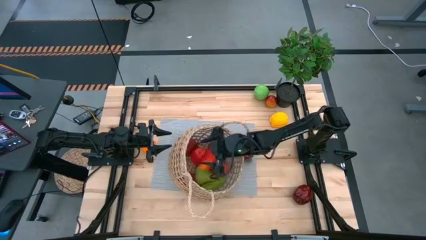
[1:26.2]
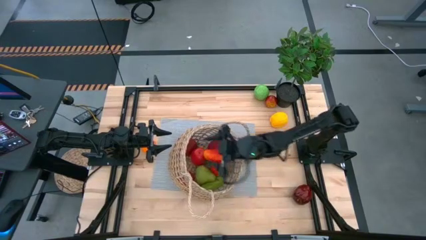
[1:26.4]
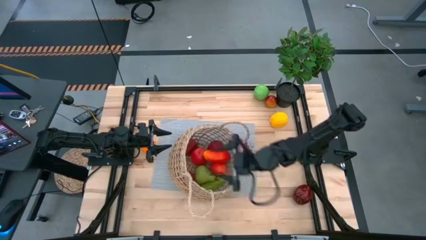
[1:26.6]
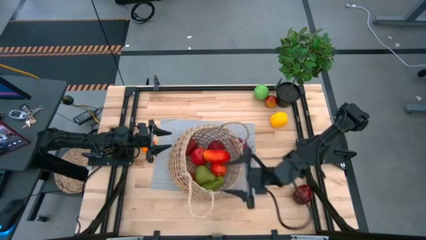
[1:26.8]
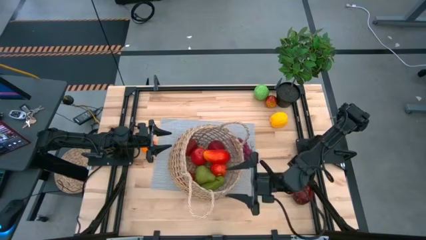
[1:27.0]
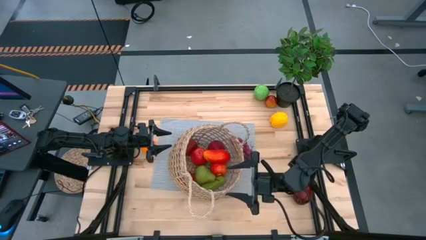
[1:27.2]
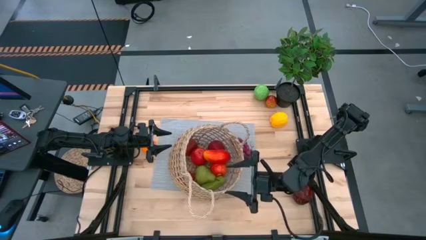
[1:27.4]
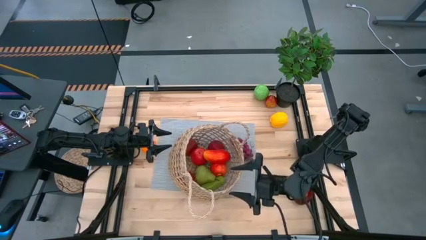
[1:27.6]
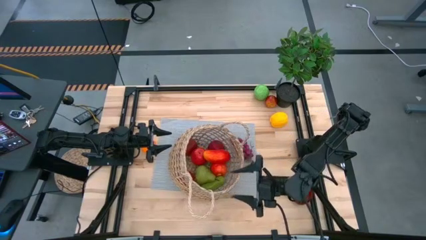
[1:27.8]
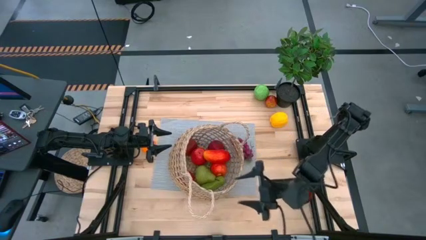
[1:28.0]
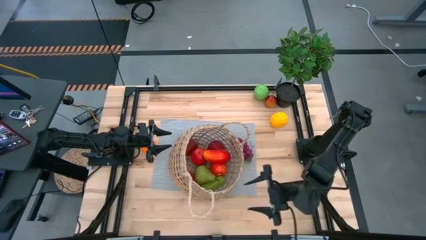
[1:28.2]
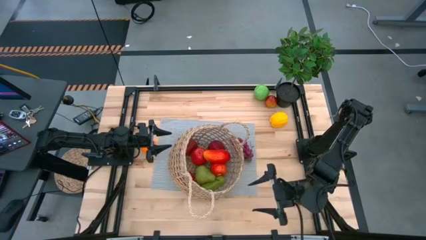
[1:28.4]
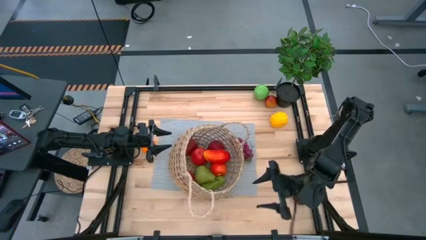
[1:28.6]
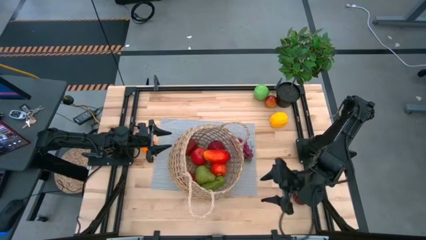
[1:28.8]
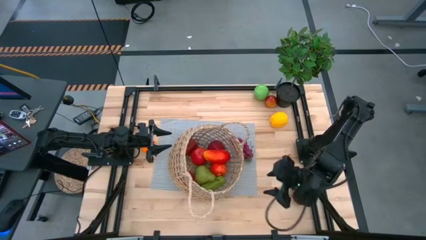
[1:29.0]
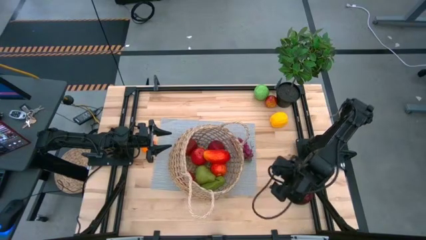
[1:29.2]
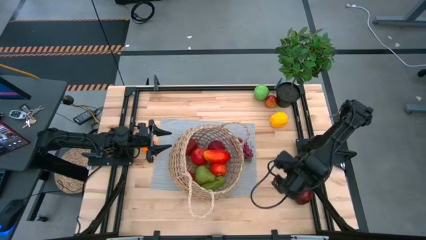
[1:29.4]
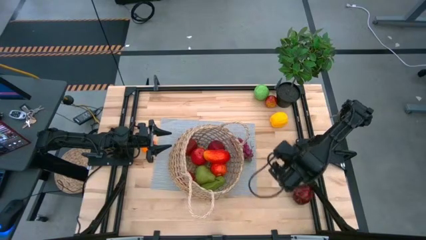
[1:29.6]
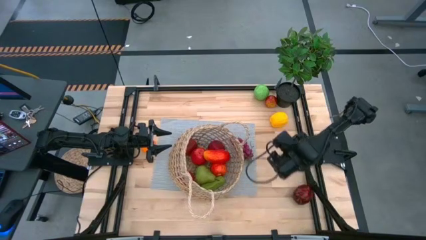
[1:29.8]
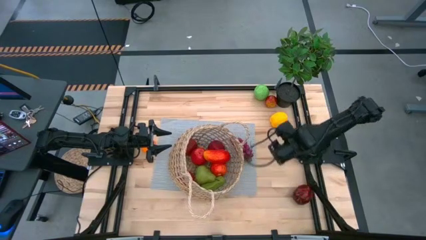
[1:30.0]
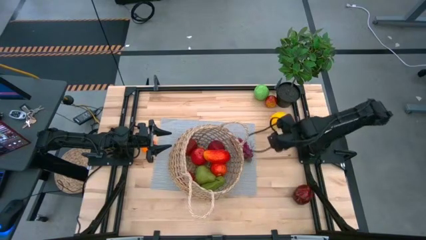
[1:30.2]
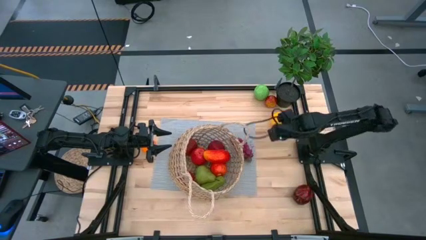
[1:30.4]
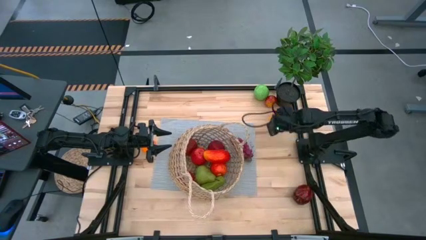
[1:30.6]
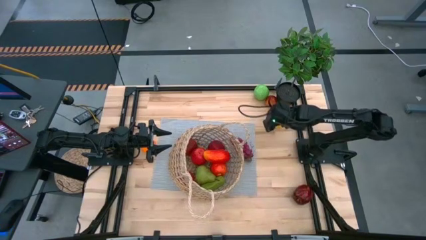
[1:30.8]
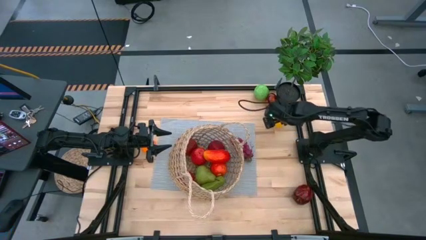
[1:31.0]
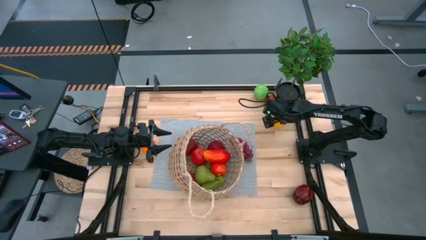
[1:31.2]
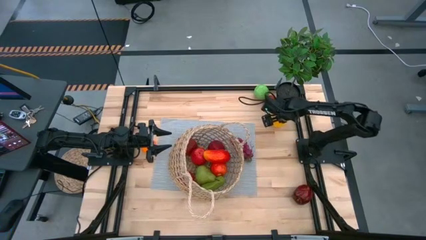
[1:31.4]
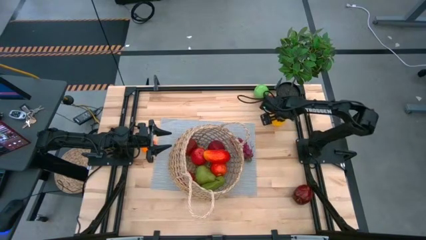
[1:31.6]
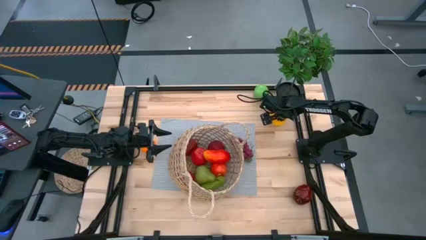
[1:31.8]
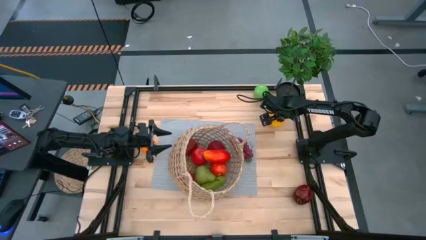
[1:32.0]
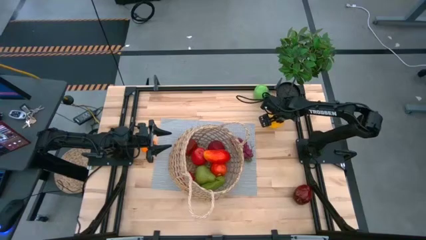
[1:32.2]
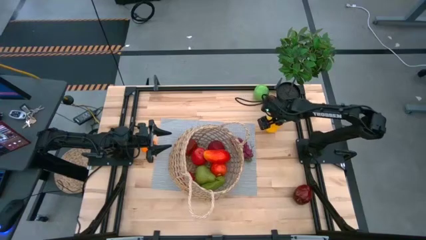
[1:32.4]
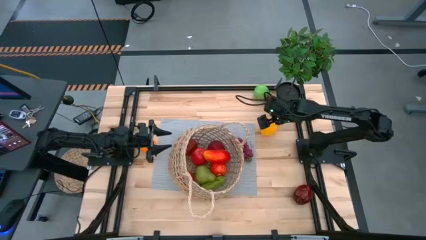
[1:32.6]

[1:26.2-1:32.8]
Task: Build produce basket
Put the yellow bell pepper into the basket

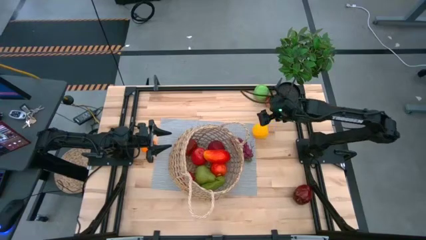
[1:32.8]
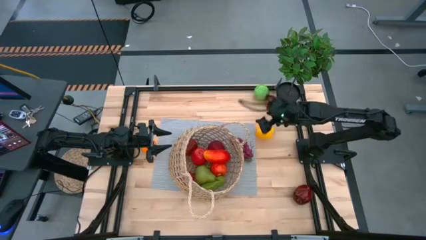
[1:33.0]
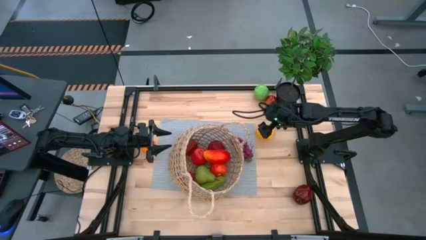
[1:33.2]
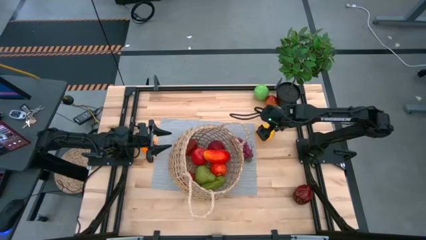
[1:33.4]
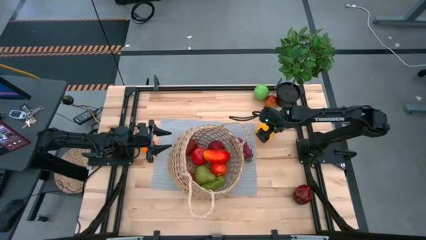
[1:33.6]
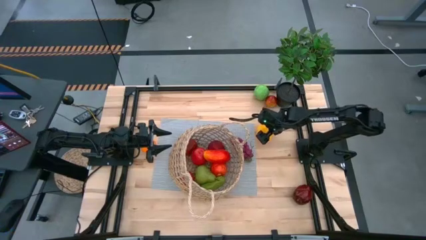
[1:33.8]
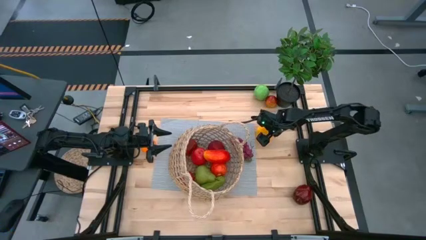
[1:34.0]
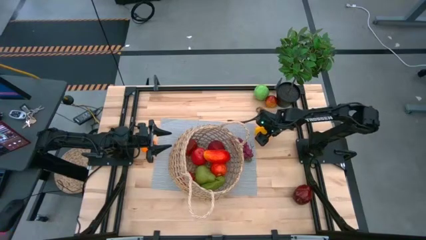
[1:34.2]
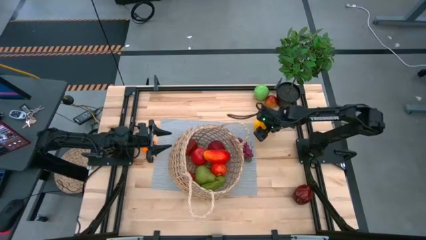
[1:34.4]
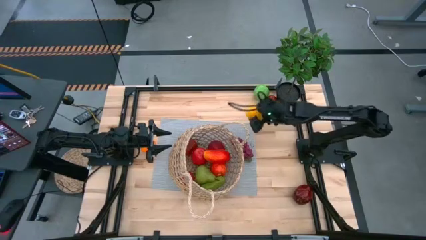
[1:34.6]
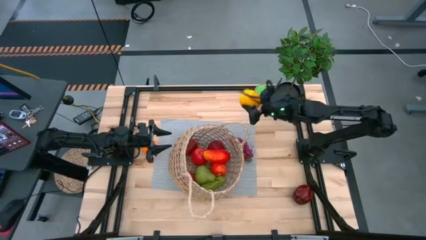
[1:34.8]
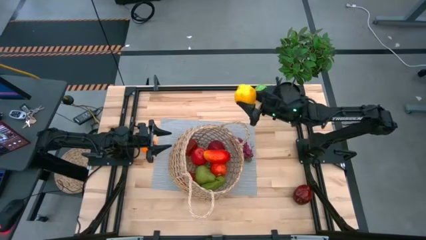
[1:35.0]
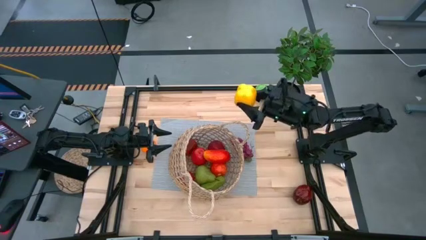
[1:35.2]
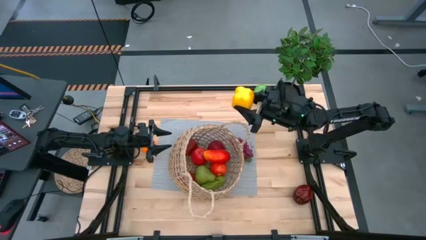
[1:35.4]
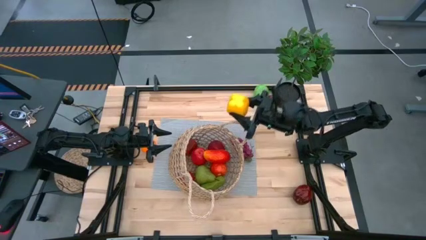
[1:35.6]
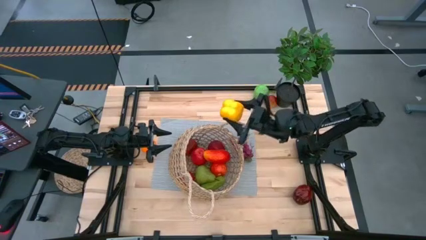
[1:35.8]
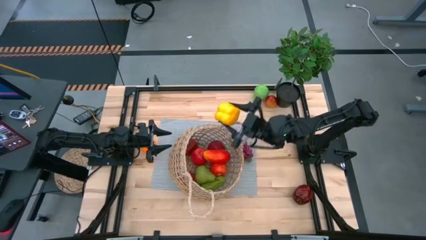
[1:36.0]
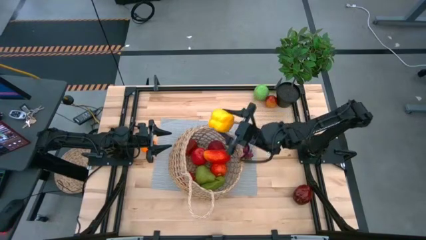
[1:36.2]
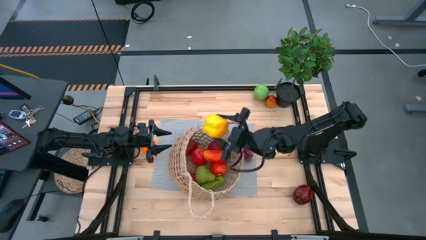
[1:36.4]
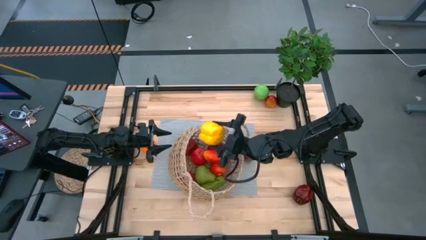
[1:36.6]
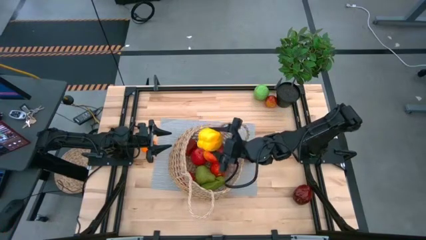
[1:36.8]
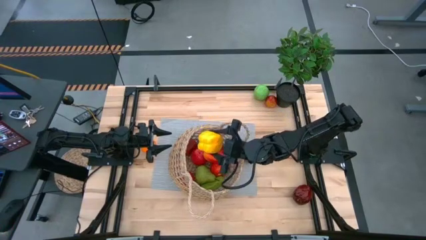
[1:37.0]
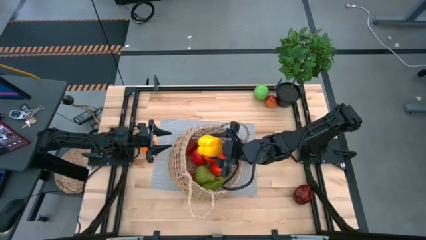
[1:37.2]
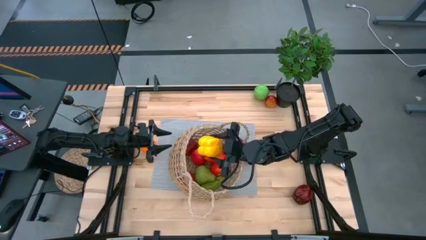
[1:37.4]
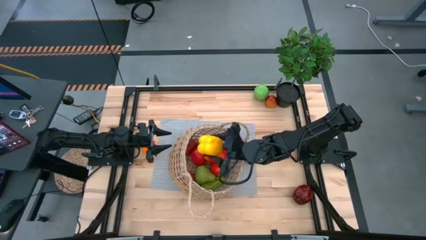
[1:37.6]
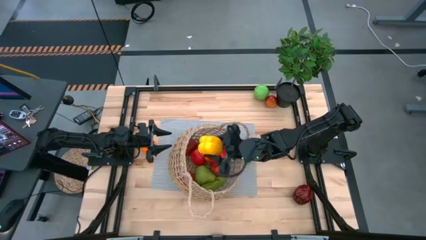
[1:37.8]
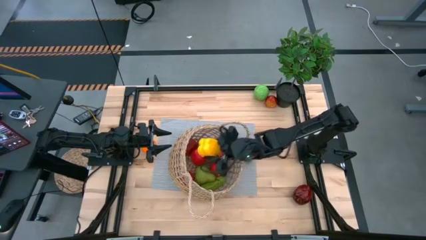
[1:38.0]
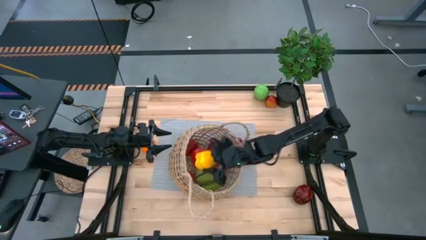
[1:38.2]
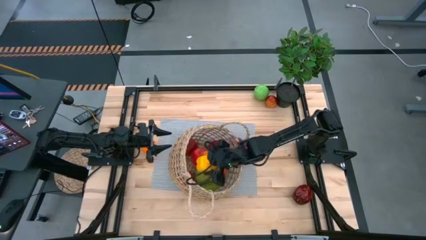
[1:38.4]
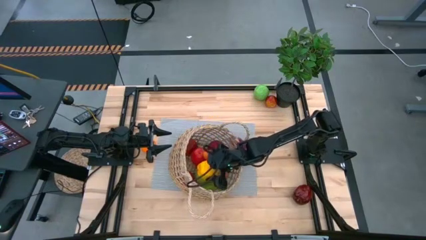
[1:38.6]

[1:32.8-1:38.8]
Put the yellow bell pepper into the basket

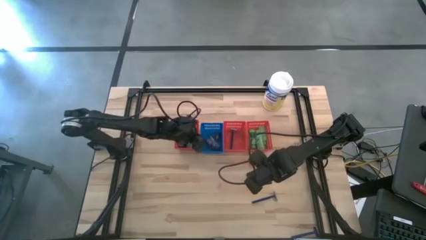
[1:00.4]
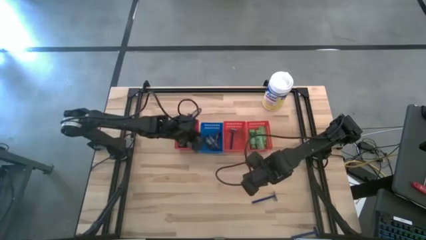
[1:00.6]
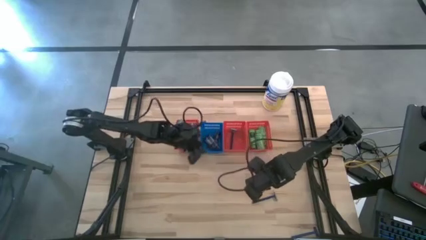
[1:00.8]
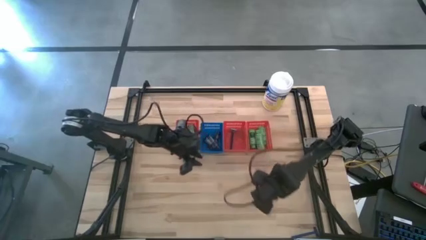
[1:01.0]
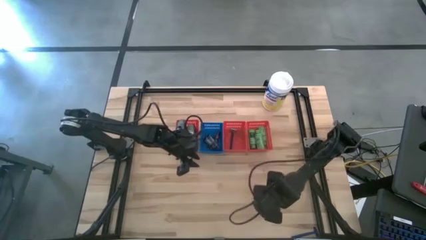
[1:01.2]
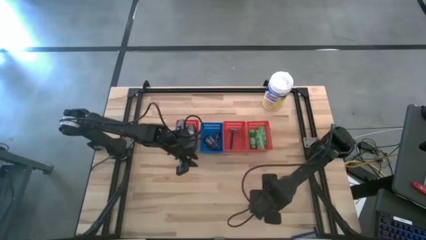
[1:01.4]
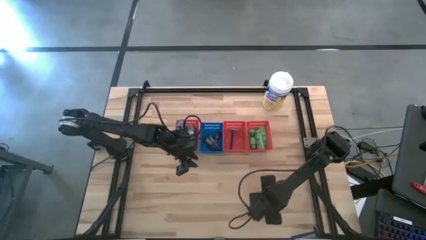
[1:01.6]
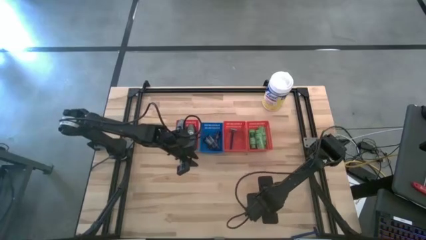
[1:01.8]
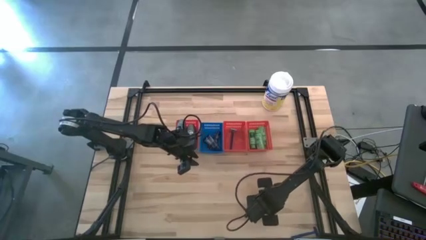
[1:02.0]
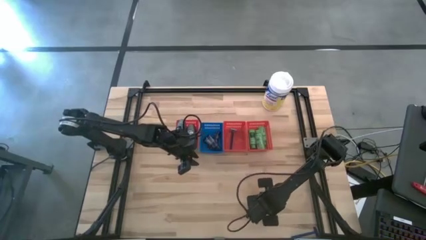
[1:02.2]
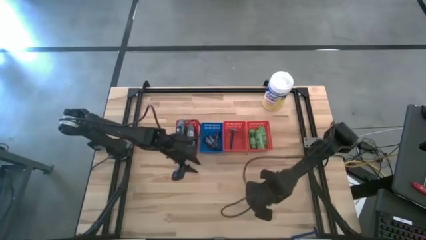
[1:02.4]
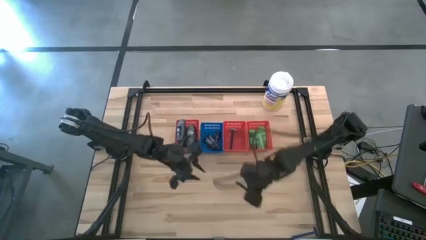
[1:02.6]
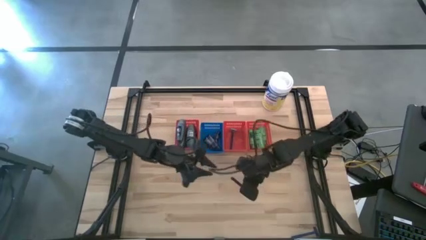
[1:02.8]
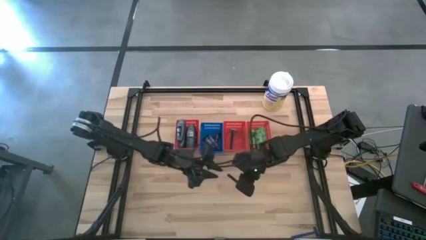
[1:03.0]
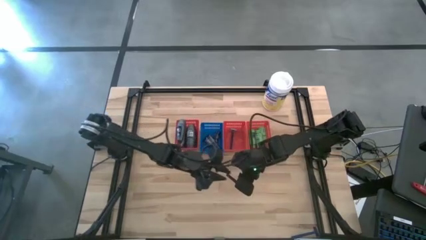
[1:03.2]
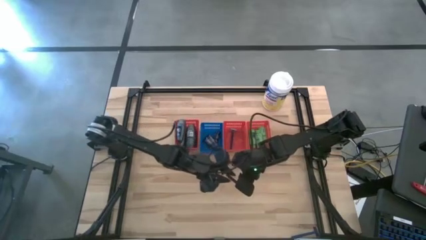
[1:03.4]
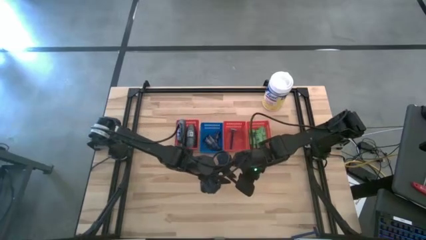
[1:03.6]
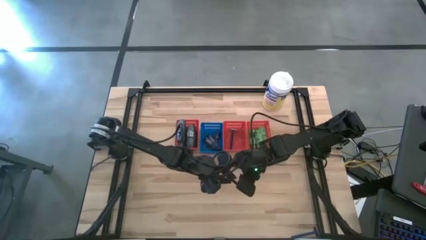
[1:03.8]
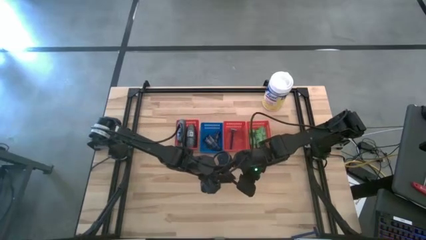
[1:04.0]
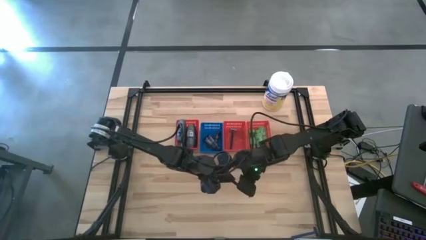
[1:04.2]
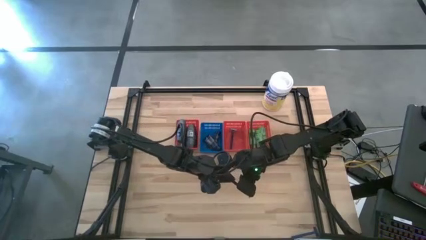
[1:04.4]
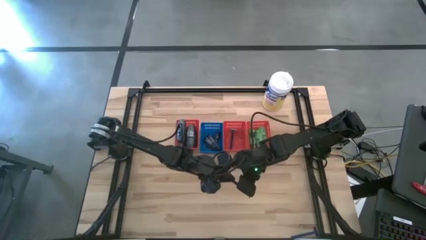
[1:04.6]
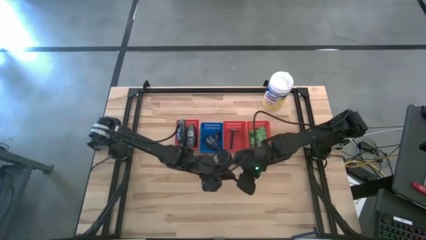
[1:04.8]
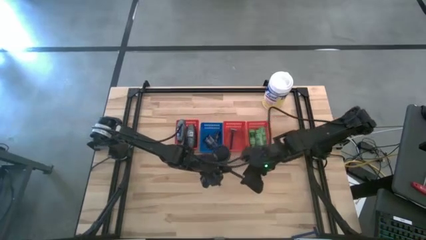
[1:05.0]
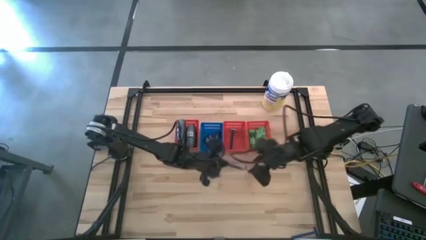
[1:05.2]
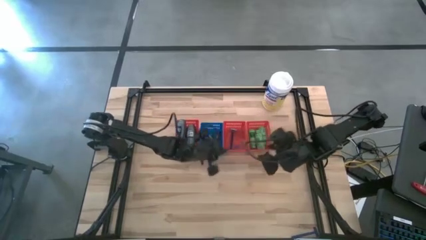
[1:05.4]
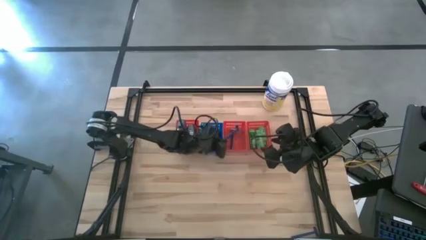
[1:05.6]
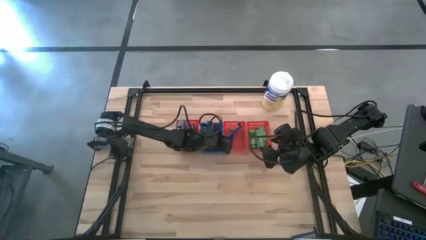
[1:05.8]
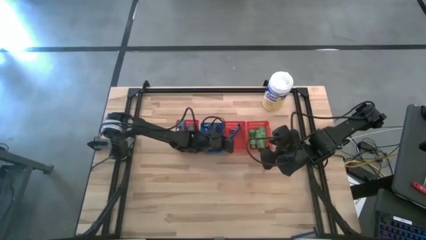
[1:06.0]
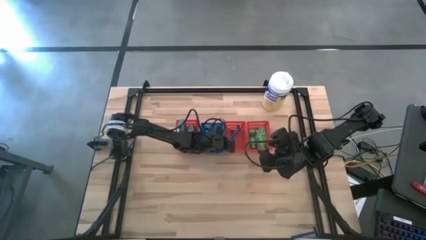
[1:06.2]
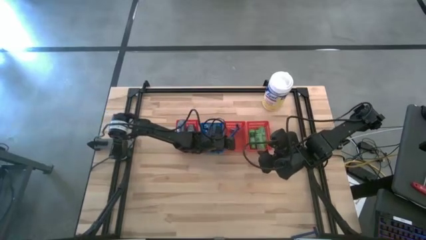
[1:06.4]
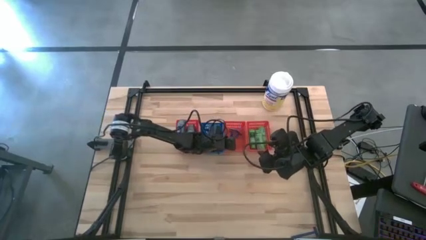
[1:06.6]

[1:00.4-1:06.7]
Task: Pick & Place Travel size toiletries
Put the blue razor into the middle red basket
